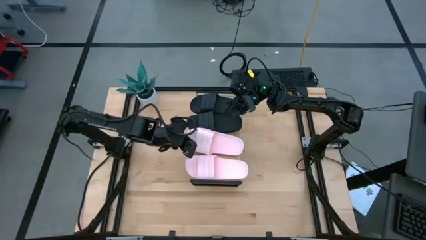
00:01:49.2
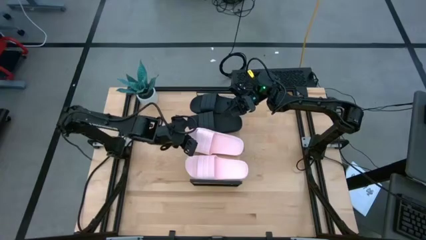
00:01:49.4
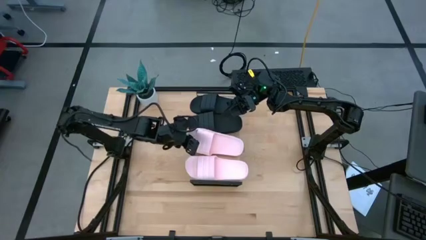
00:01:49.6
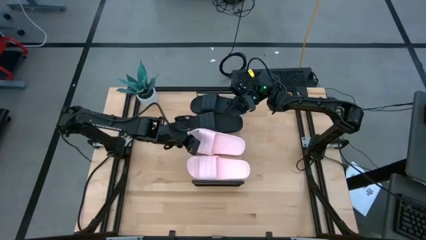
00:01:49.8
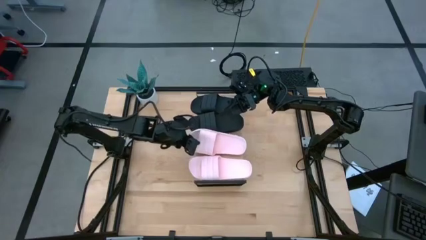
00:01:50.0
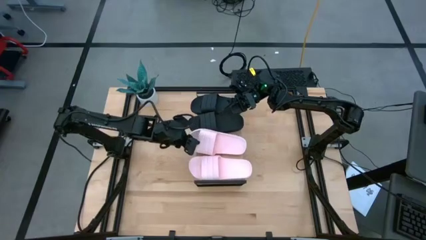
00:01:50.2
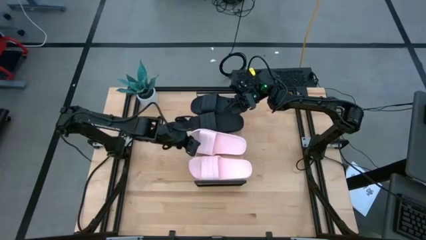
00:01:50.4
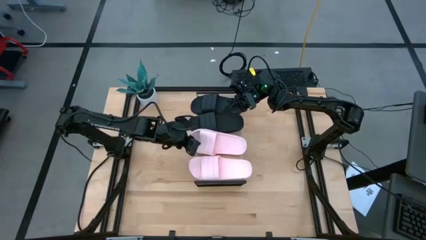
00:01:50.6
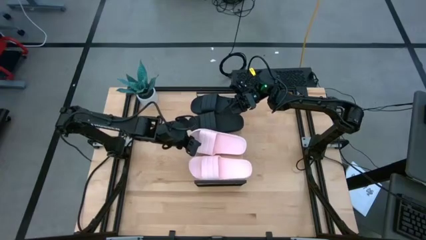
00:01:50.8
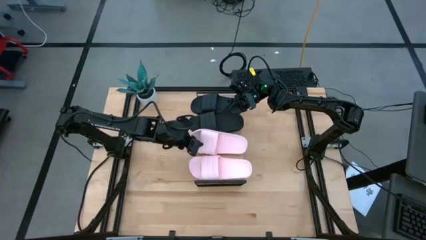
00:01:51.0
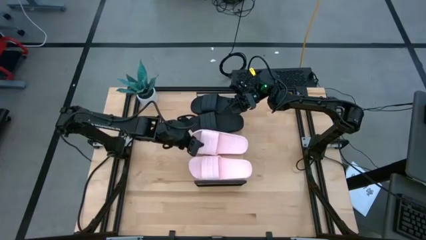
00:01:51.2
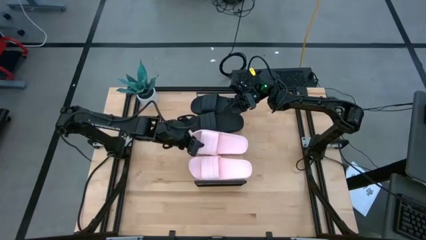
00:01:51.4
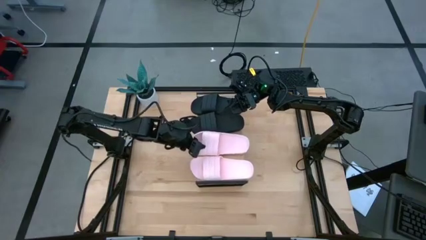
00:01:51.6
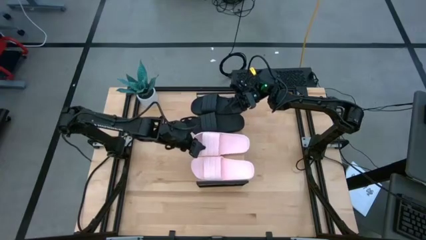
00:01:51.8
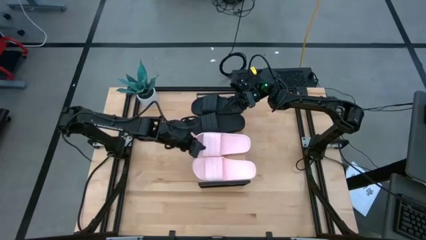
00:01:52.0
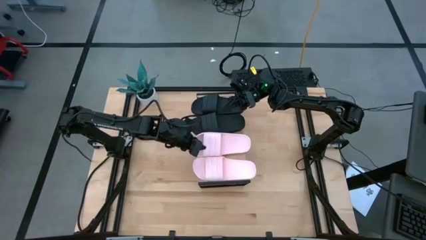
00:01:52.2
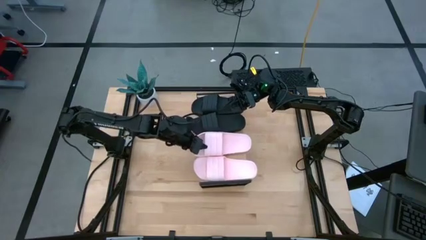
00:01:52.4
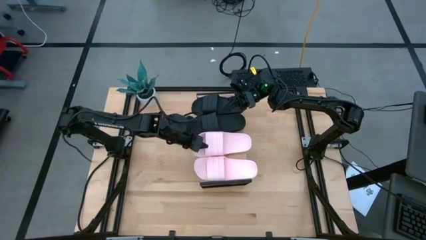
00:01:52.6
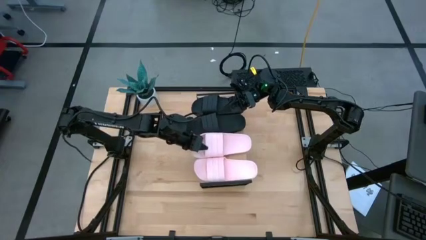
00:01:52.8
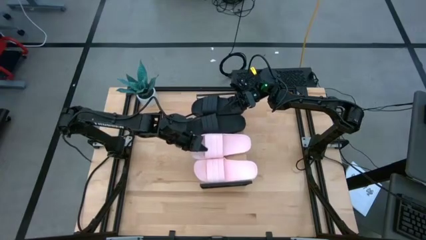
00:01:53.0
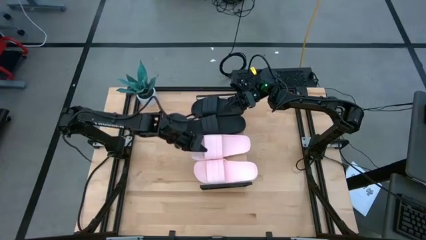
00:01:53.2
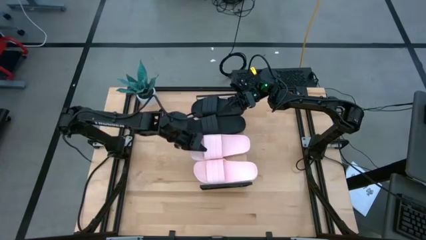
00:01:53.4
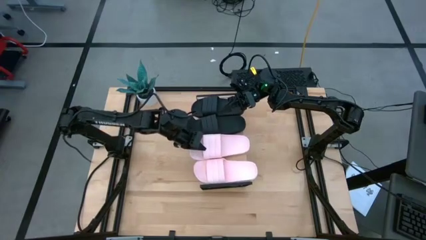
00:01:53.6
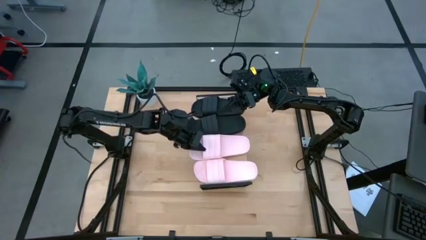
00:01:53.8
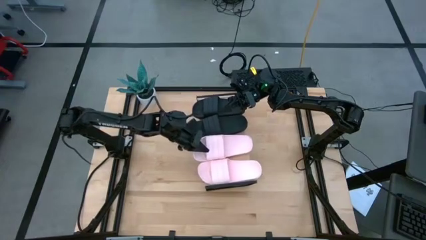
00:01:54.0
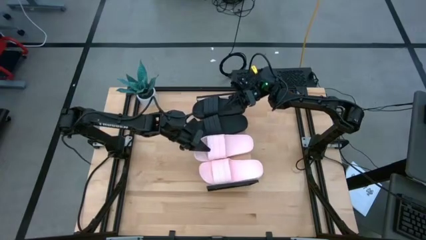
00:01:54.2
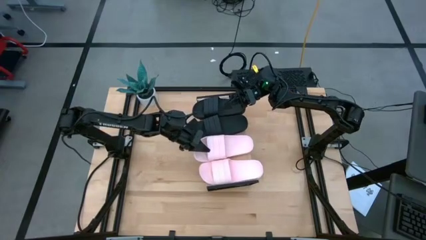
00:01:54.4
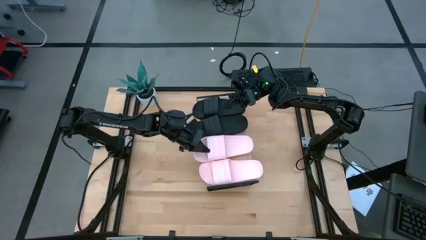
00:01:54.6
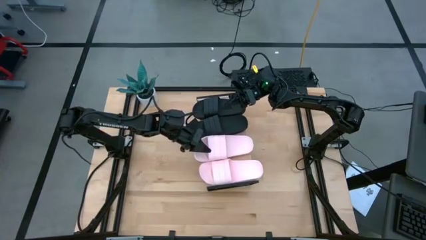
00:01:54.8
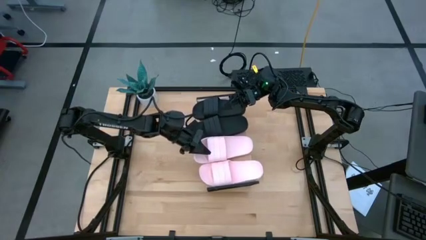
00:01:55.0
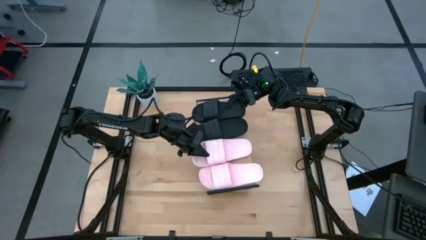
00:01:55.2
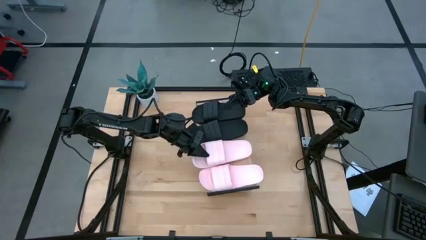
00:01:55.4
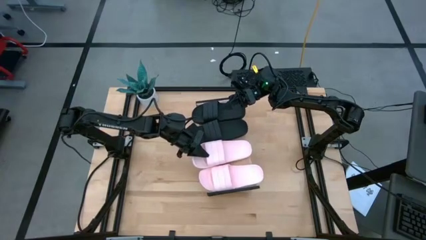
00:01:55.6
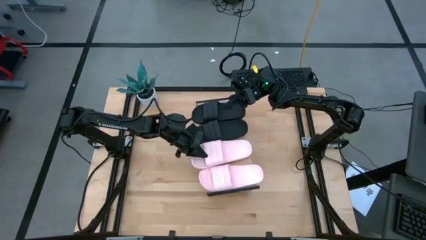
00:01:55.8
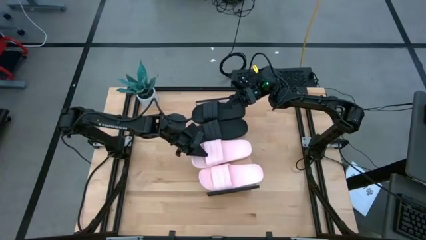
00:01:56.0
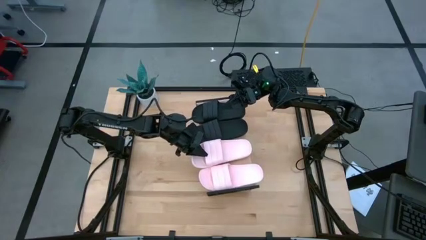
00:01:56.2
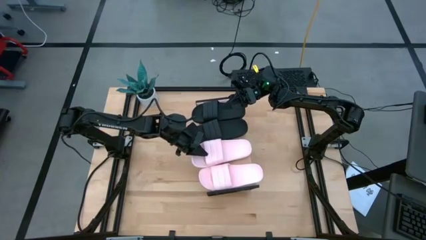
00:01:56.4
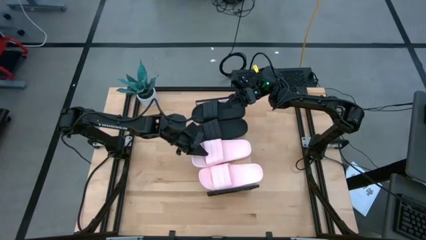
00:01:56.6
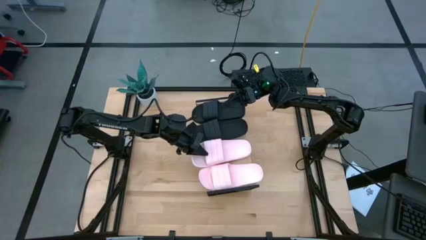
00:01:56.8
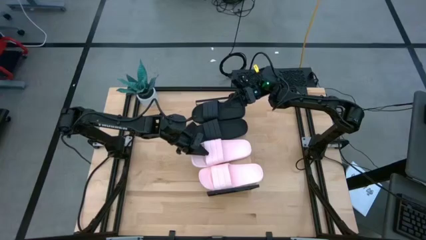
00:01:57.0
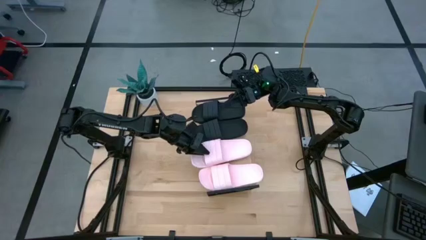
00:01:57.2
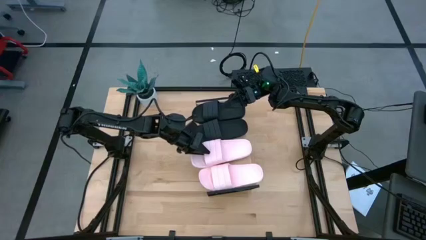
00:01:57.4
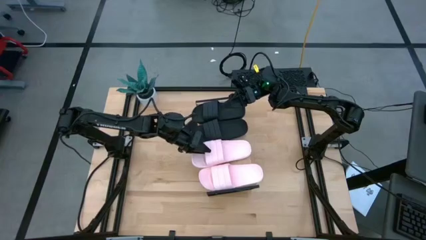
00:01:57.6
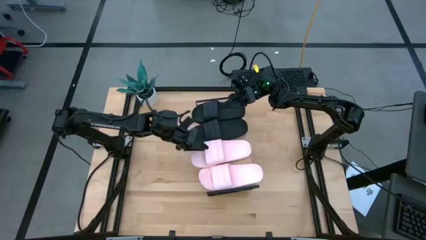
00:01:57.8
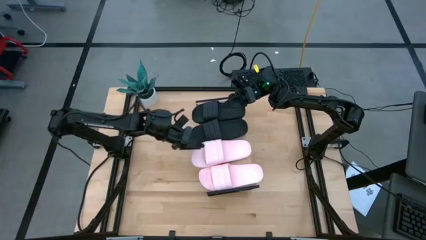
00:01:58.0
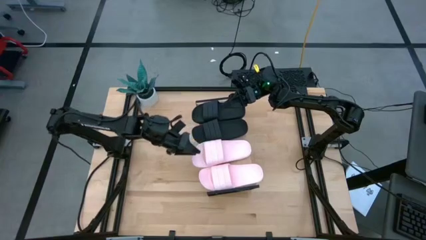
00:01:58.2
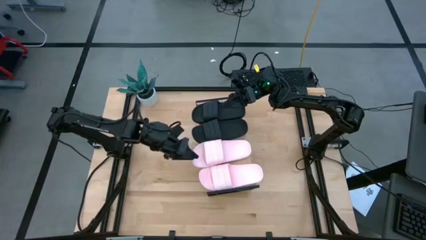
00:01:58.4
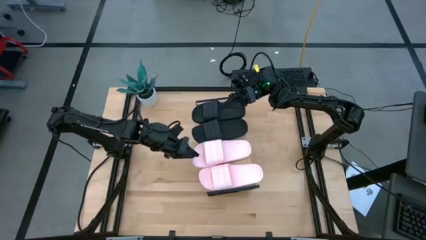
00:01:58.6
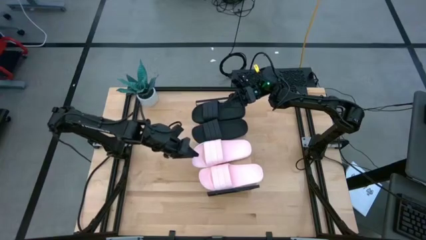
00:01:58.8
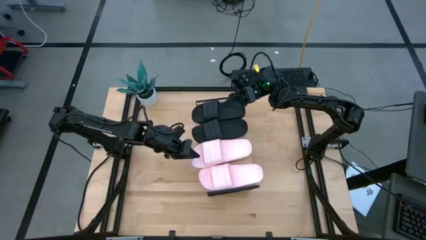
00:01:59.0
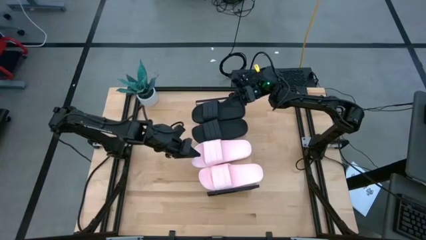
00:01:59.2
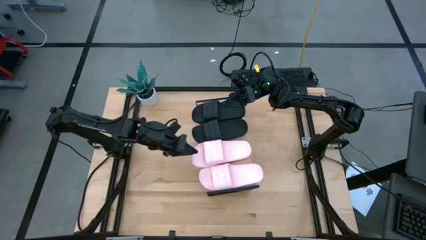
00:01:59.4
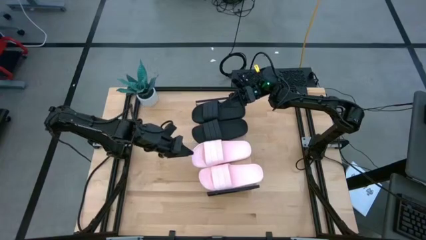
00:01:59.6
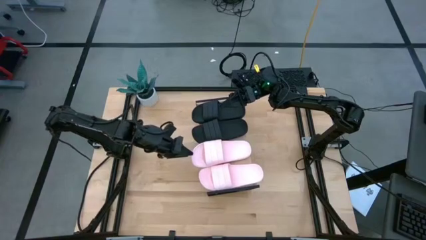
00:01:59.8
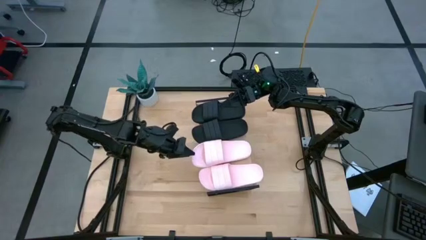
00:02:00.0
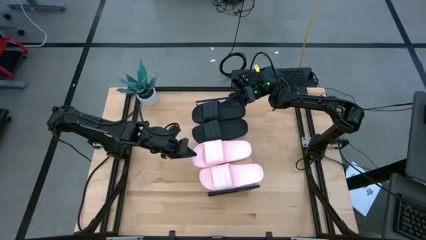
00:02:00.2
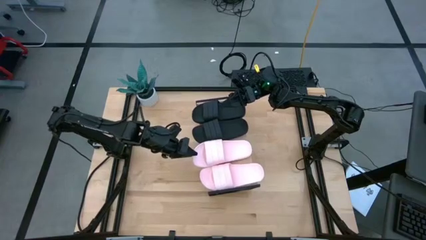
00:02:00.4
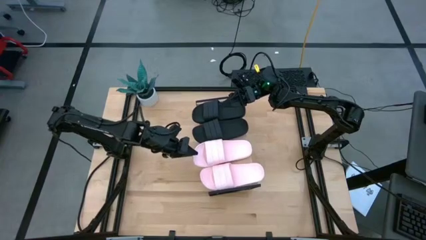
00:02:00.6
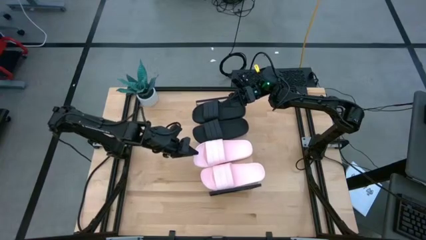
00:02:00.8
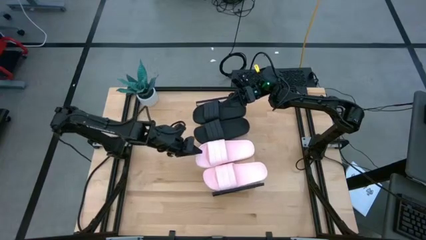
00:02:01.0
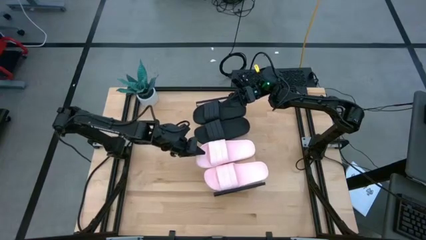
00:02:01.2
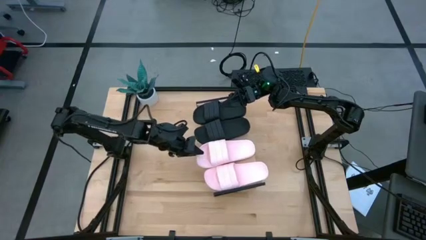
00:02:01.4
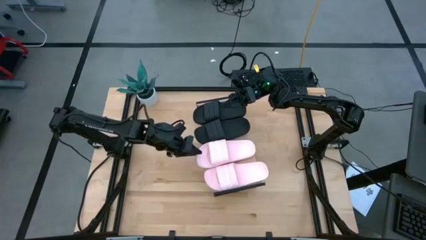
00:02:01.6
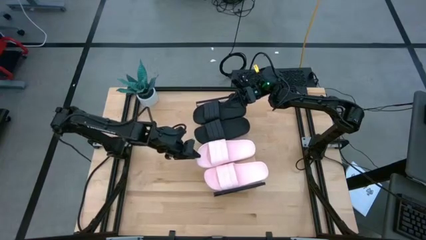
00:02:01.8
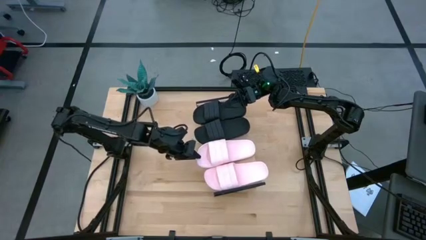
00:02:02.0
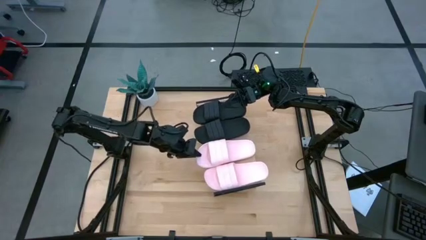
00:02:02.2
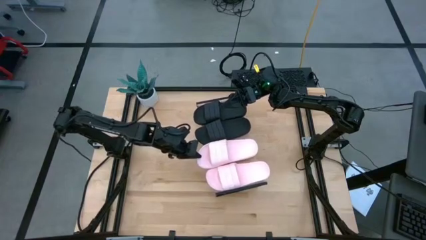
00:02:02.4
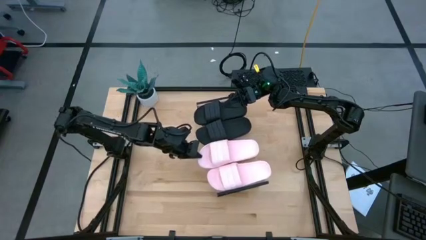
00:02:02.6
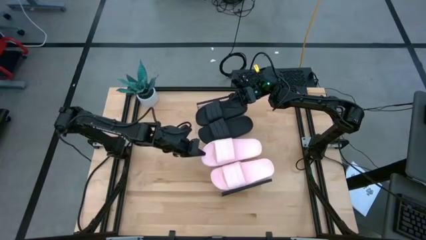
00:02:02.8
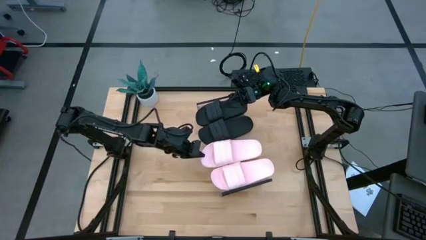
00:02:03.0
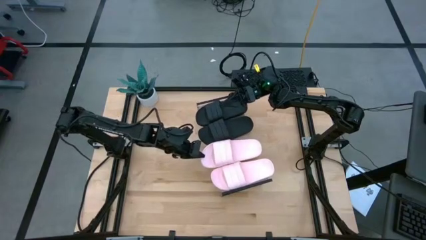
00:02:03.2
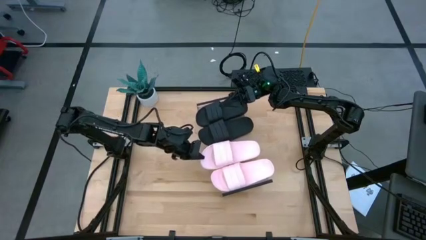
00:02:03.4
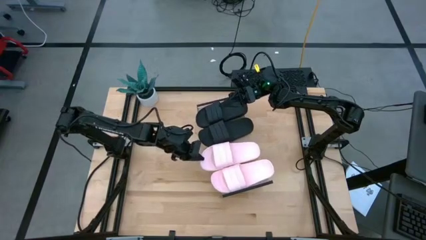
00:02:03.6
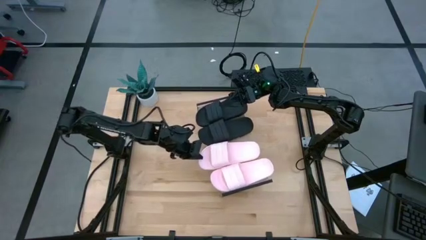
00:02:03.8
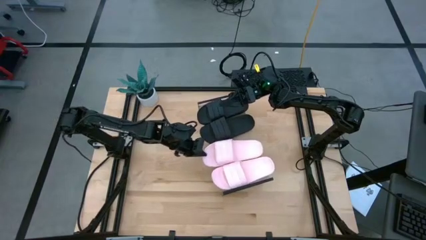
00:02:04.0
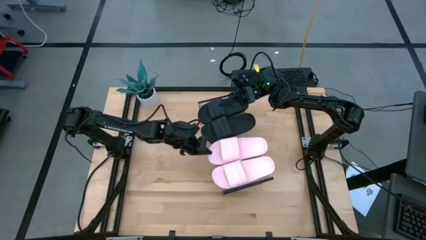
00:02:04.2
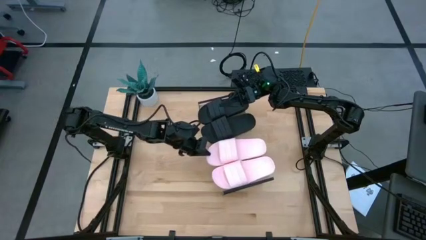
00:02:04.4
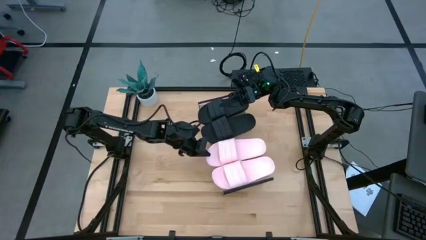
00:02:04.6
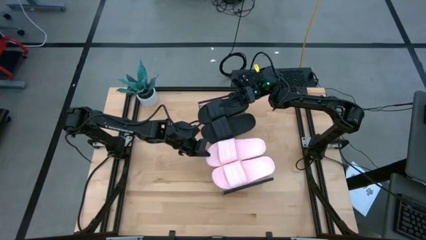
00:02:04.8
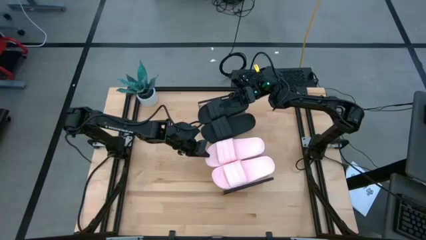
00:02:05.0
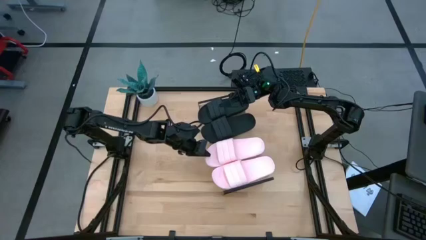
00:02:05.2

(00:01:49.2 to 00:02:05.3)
Task: Pick and place slides into the shelf
Adjust the white slides on the shelf

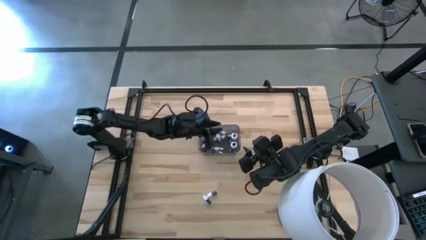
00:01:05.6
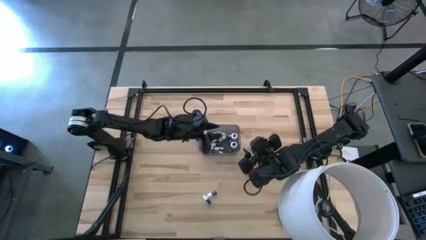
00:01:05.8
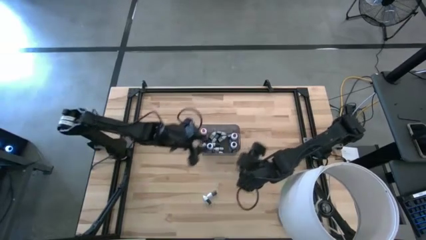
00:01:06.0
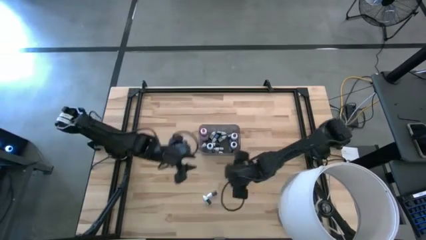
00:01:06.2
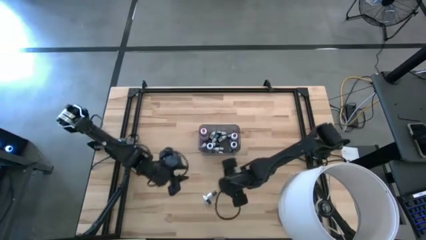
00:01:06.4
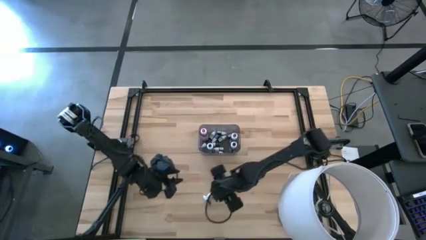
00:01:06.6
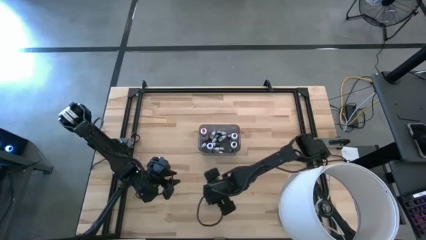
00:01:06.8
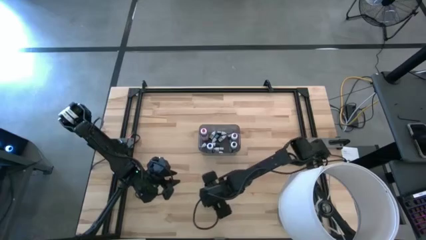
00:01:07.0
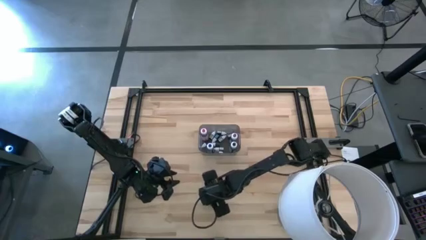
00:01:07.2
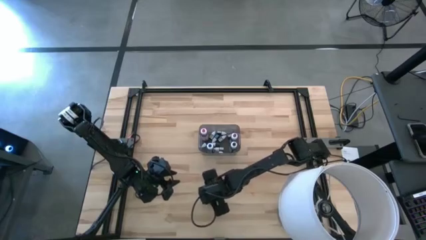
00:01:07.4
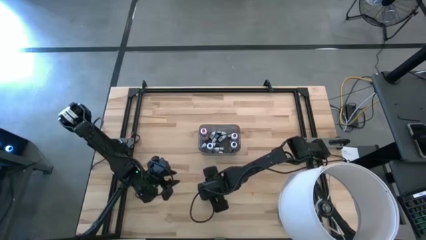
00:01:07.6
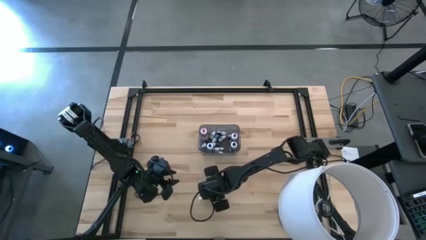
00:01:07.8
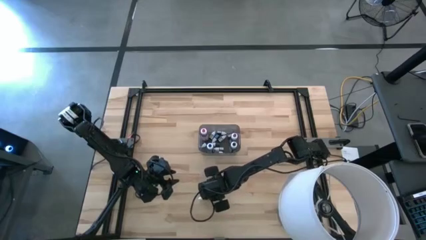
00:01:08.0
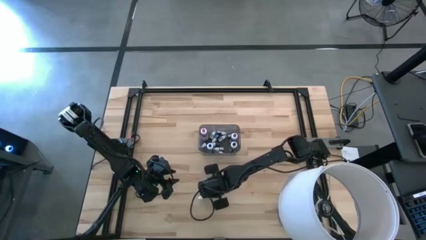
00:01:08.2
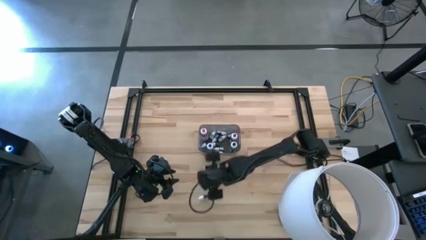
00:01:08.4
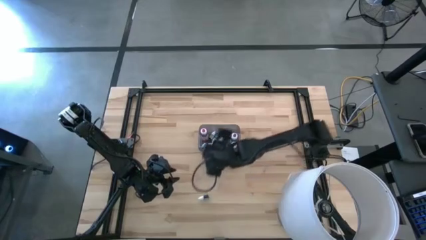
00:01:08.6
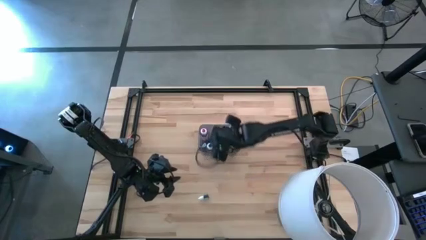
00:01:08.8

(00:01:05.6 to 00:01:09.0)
Task: Pick & Place food coloring
Put the small dark green food coloring bottle in the black bin
